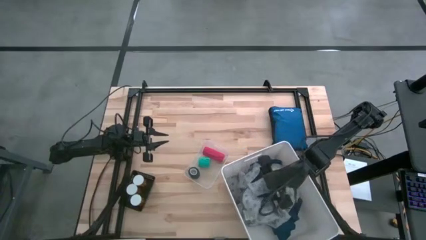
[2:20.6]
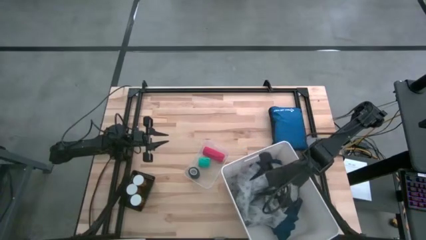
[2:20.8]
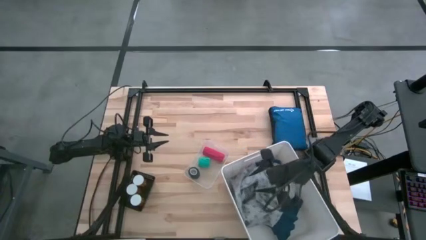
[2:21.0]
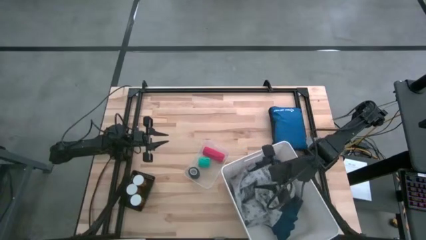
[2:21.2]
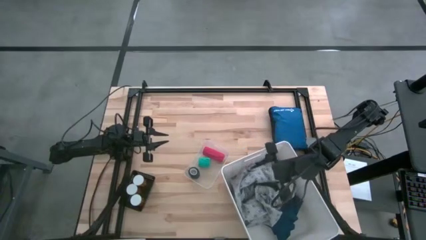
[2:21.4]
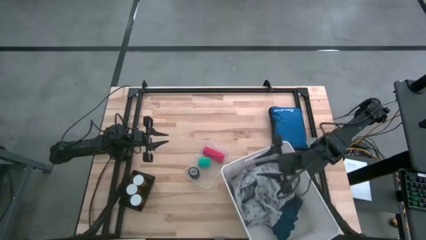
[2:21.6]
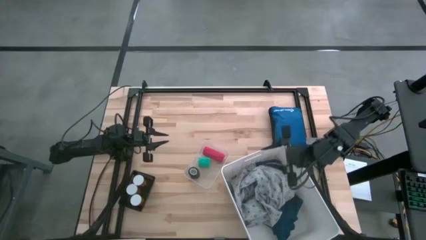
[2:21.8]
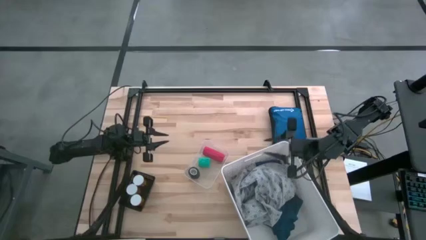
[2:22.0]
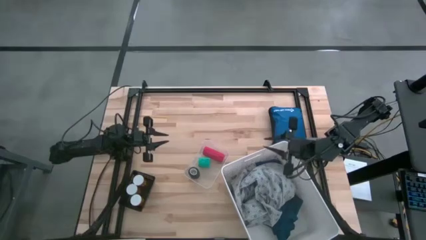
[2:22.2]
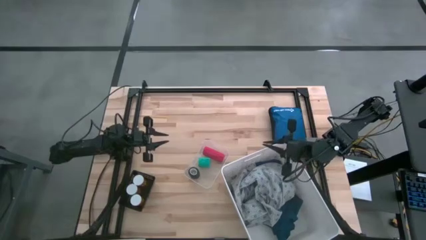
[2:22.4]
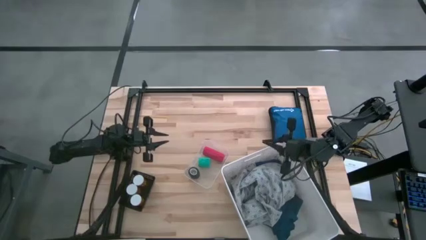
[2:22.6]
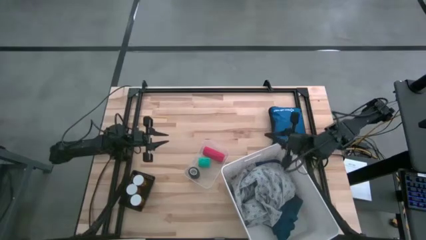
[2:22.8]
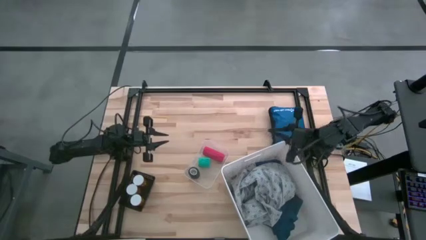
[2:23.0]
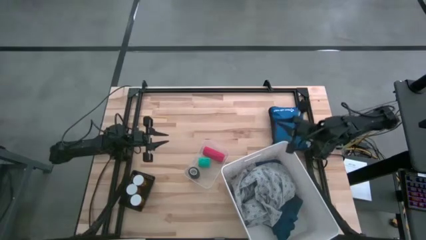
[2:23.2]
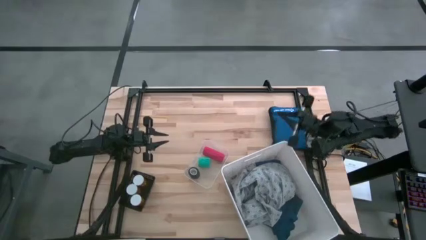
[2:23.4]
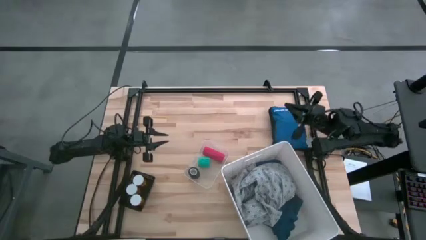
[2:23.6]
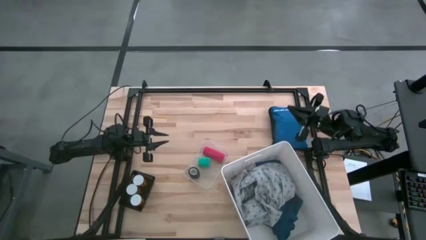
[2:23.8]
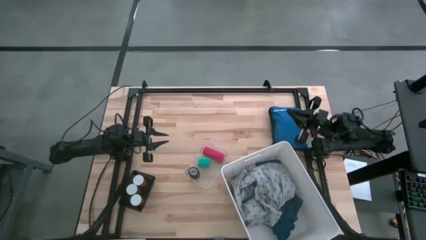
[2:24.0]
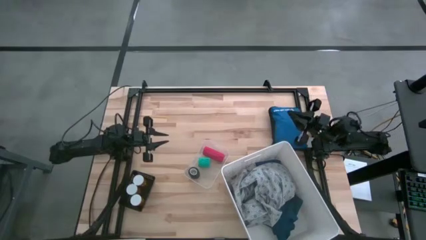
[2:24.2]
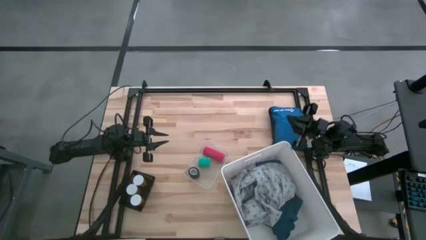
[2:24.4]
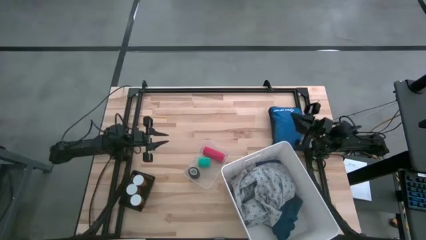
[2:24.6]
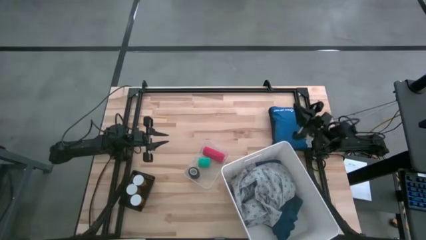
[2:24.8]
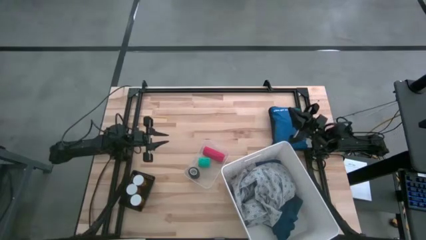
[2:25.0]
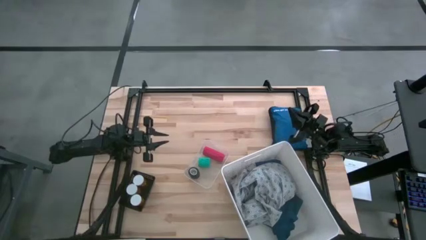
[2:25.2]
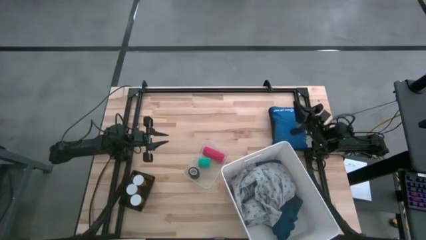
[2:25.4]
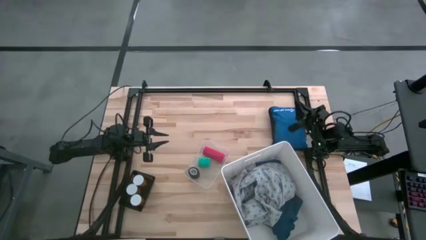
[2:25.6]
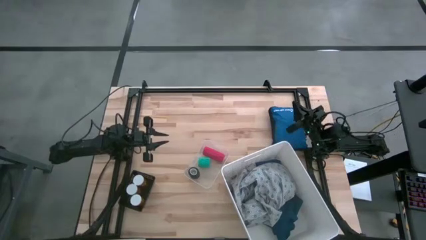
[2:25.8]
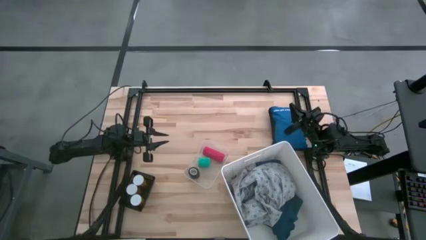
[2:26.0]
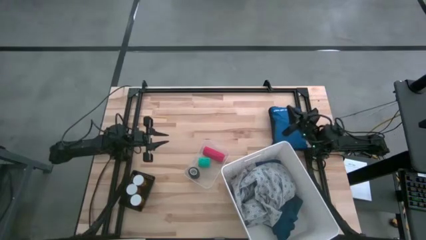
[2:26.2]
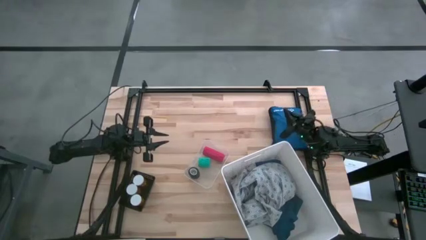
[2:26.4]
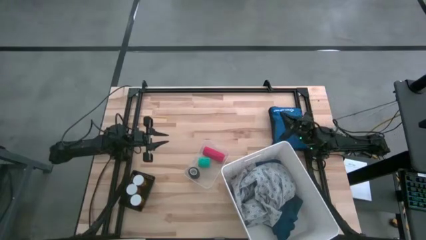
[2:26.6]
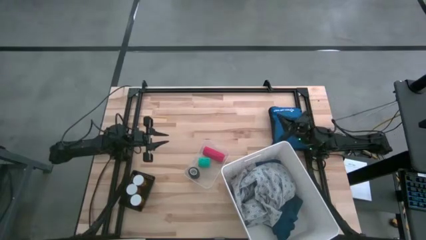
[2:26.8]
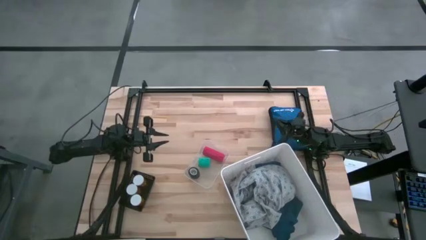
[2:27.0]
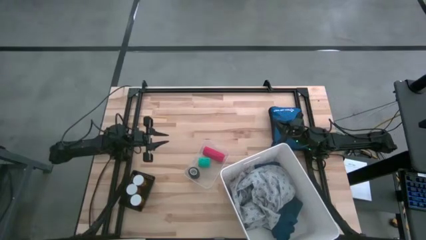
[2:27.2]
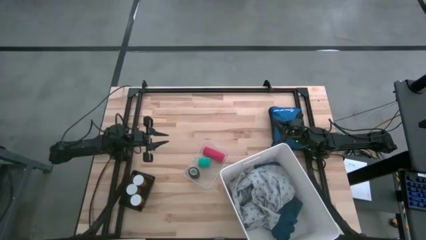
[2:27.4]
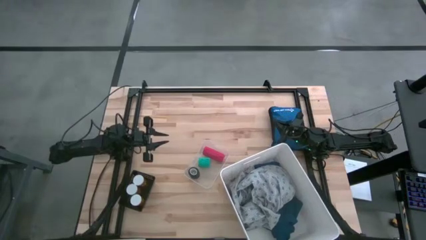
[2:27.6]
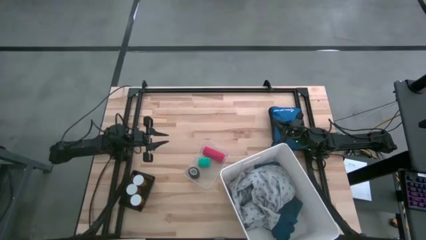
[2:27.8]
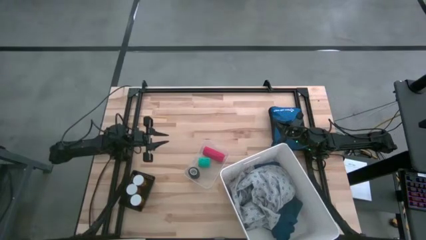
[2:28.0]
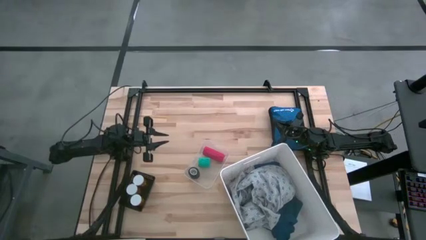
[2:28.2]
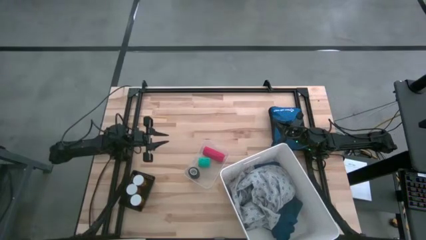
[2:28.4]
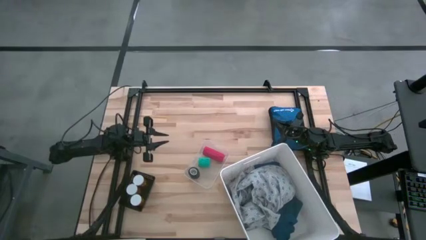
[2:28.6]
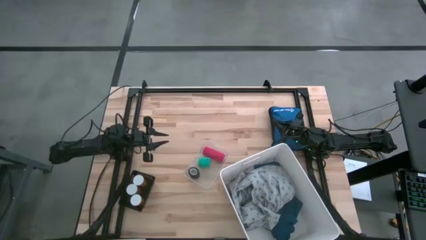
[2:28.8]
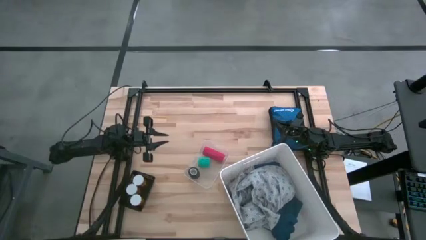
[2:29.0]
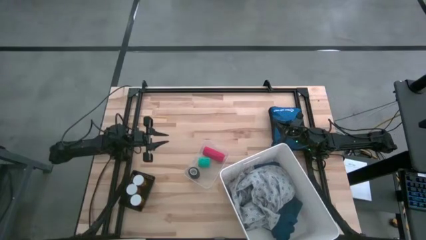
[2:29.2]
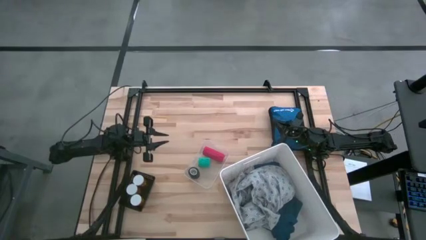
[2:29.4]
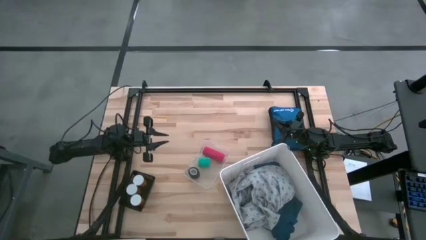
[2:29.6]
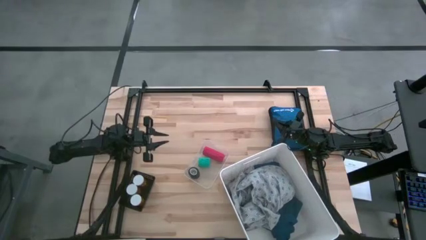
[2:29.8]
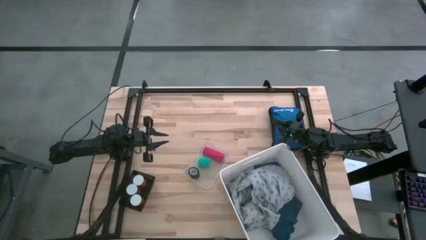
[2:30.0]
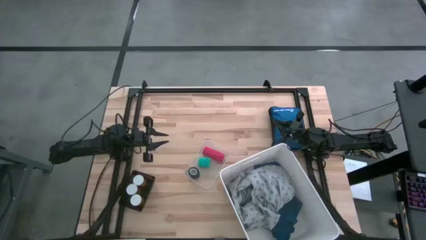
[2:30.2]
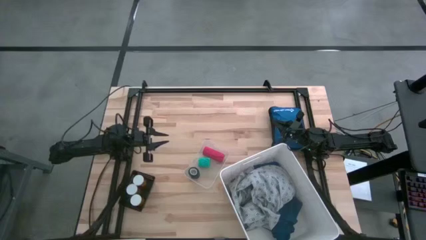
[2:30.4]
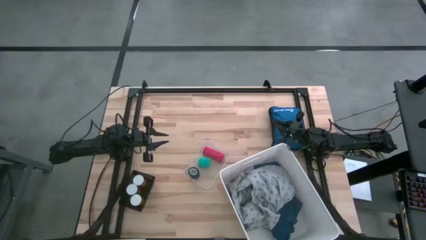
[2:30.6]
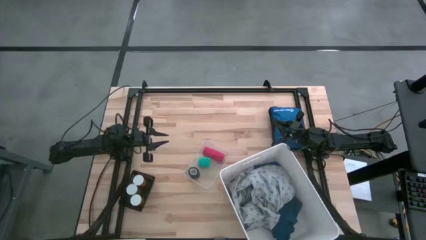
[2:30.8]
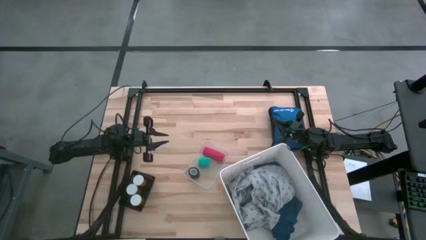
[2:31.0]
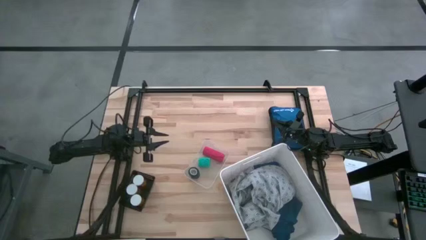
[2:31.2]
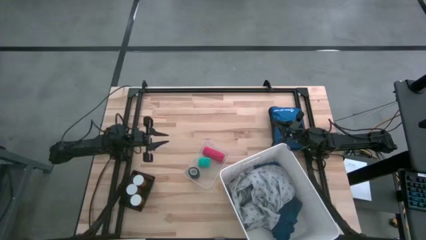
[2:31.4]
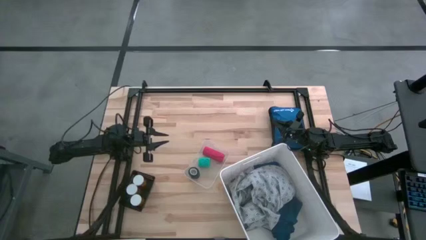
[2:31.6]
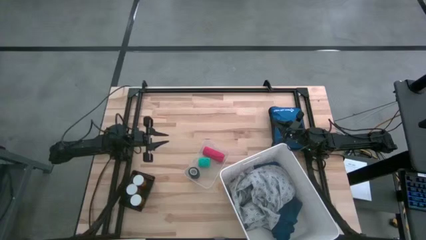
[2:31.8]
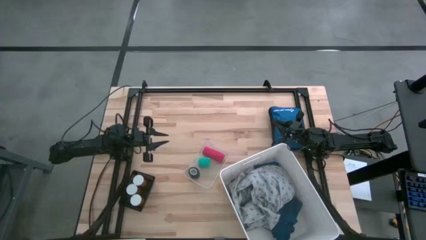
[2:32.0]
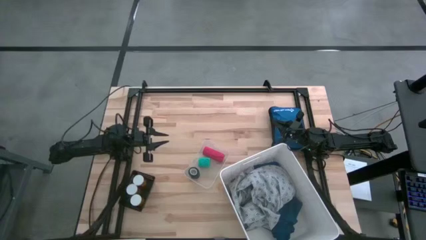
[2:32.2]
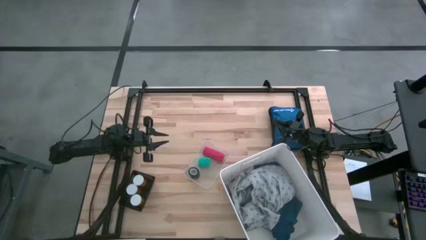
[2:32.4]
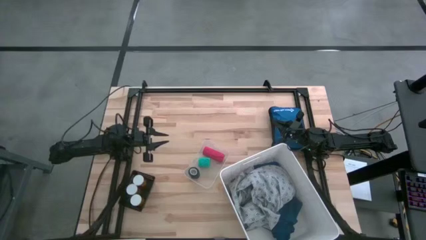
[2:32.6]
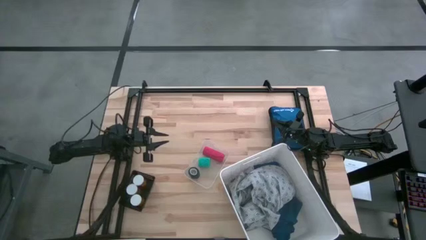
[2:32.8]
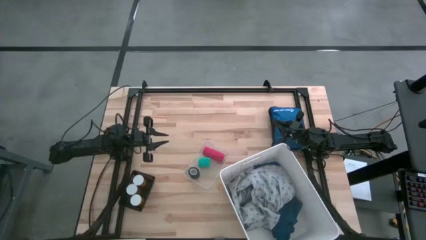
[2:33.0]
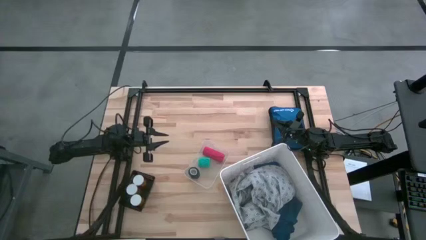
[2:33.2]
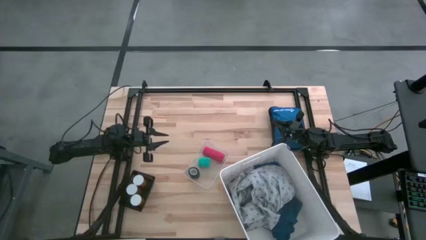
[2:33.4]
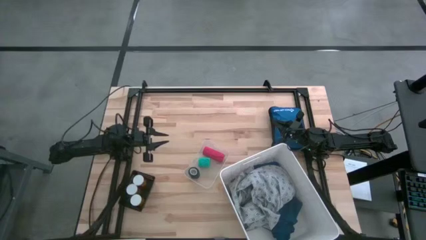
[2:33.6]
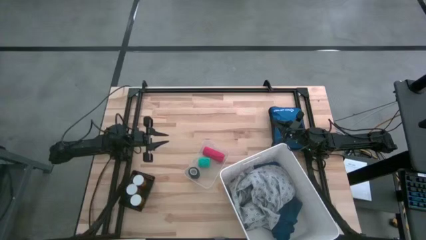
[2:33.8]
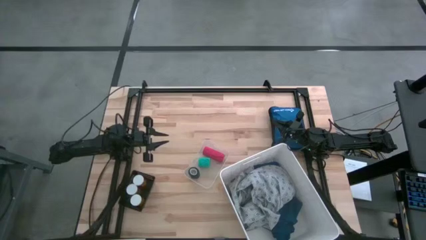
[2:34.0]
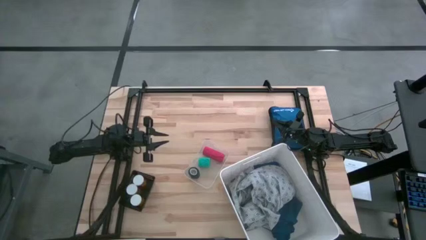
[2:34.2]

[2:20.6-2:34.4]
Task: Pick & Place Medicine items
Return to Home Position

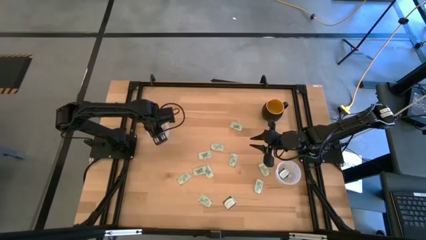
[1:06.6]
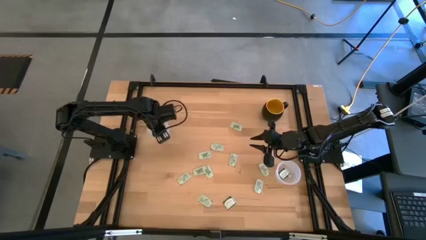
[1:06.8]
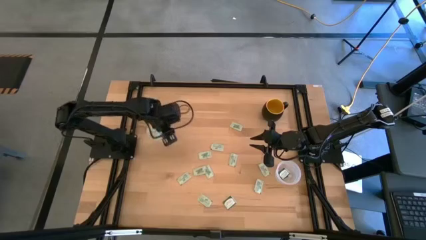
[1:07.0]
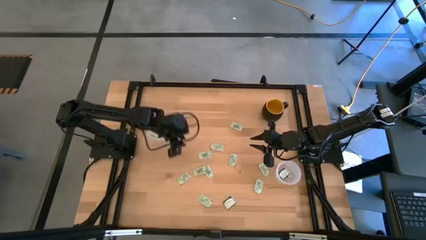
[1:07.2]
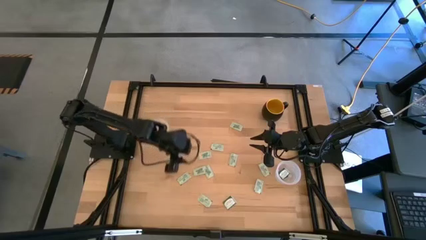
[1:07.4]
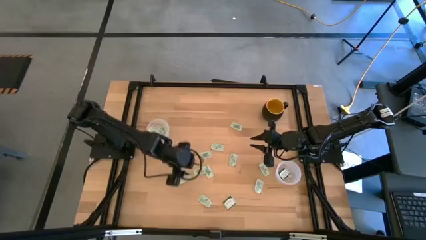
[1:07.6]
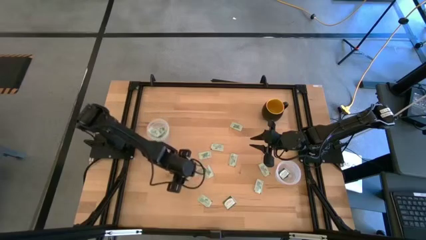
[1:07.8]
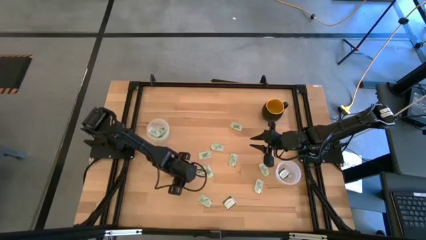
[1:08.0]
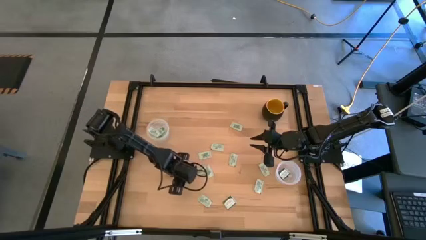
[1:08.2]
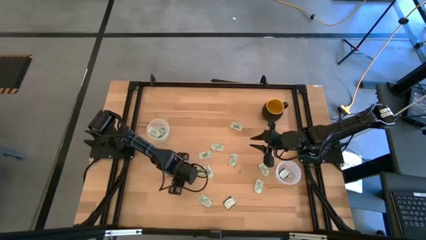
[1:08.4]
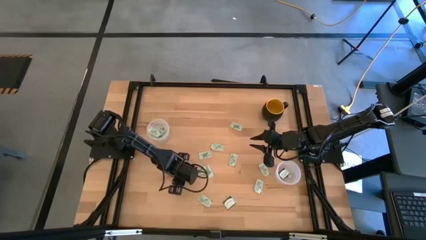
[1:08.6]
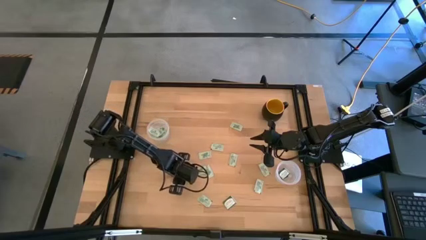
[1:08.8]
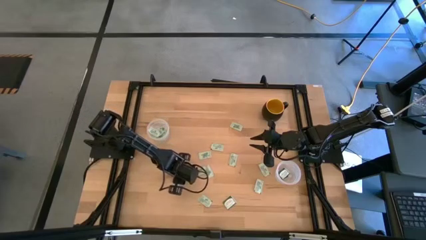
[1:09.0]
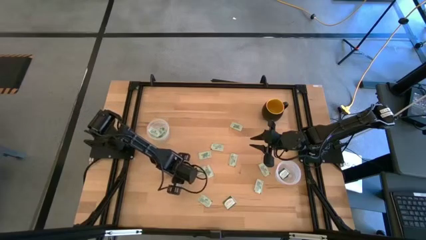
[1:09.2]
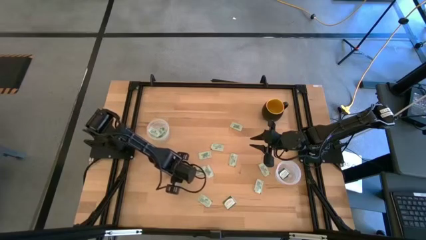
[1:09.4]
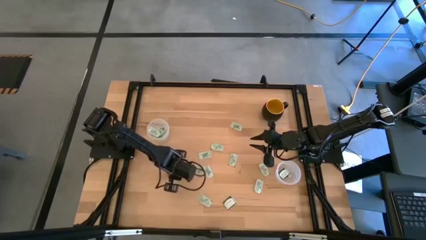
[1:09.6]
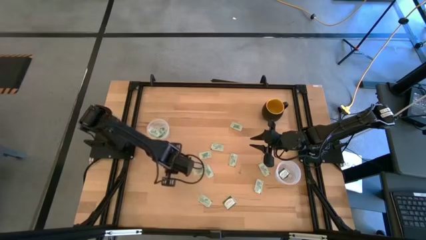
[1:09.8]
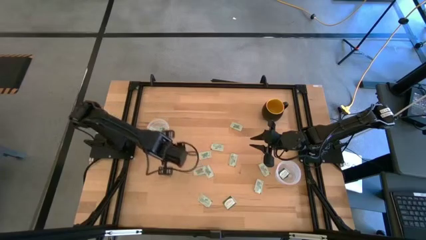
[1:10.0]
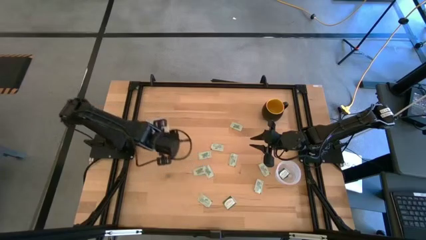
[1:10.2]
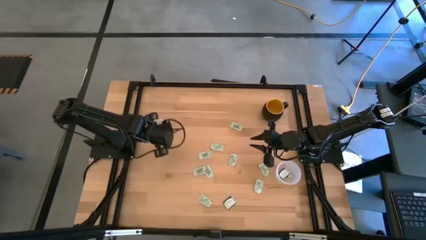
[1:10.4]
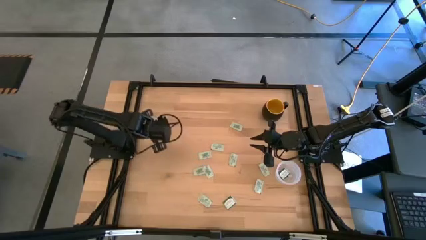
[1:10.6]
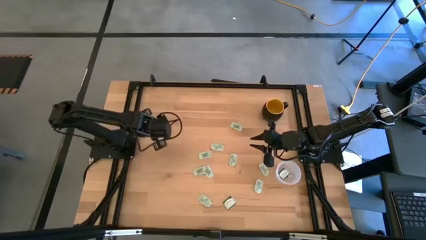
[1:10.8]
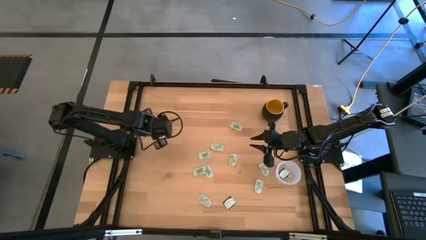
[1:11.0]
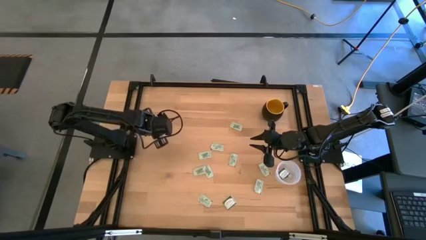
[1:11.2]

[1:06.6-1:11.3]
Task: Pick and place Stevia / Truvia into bins
Put the white stevia packet into the left transparent container
